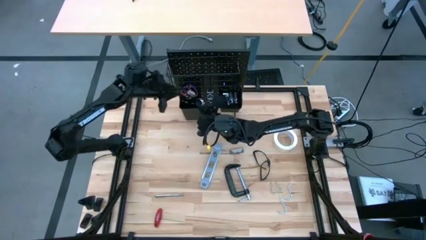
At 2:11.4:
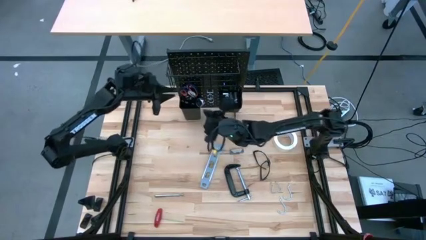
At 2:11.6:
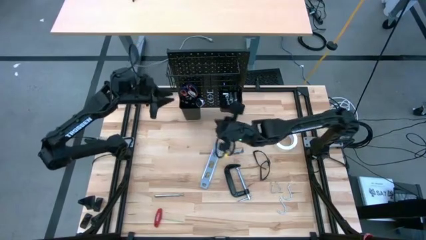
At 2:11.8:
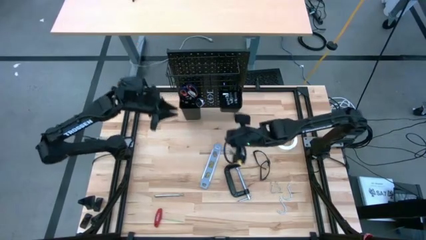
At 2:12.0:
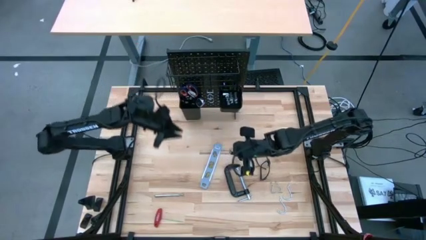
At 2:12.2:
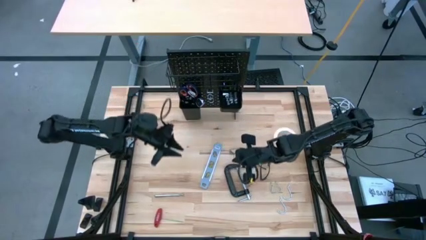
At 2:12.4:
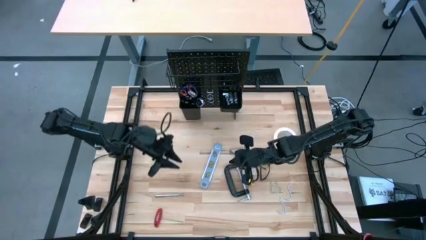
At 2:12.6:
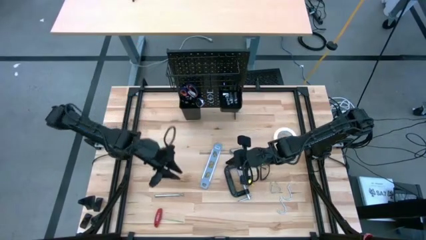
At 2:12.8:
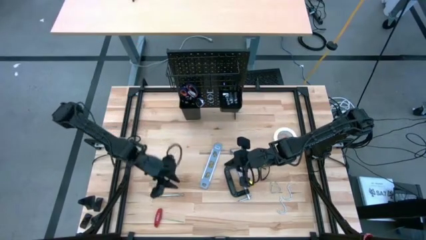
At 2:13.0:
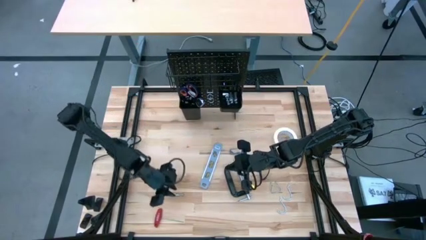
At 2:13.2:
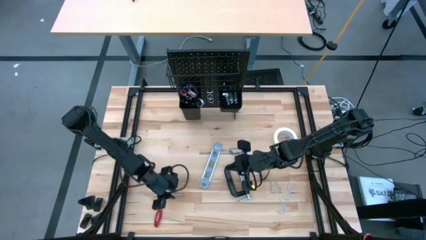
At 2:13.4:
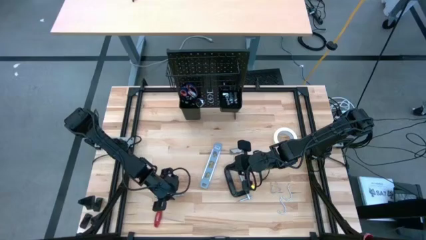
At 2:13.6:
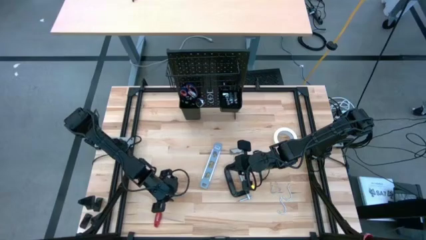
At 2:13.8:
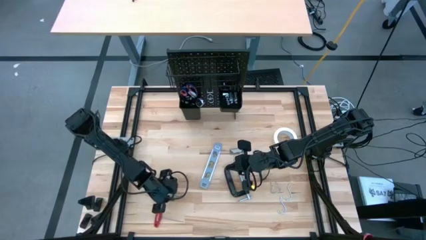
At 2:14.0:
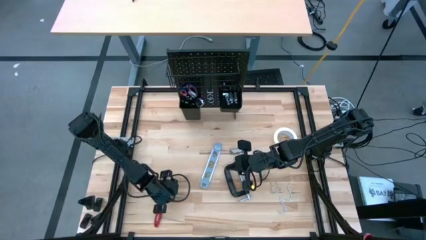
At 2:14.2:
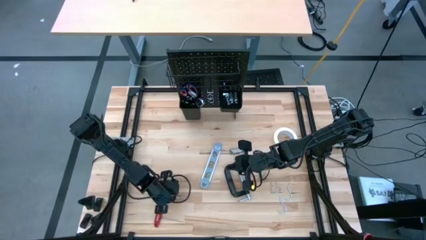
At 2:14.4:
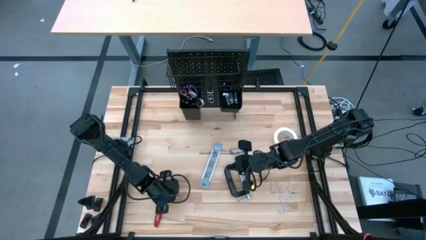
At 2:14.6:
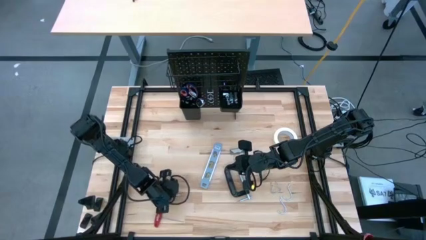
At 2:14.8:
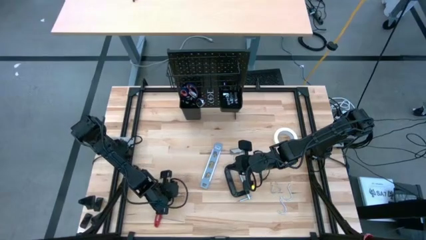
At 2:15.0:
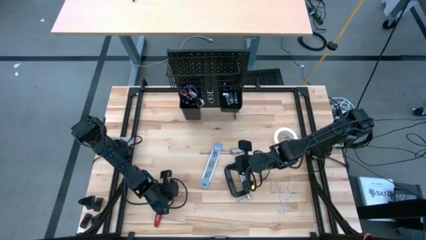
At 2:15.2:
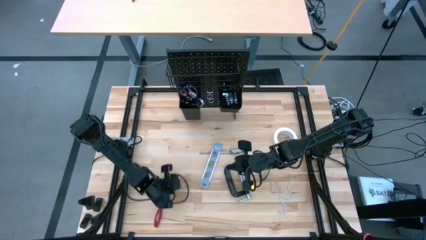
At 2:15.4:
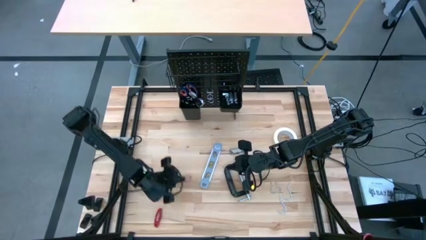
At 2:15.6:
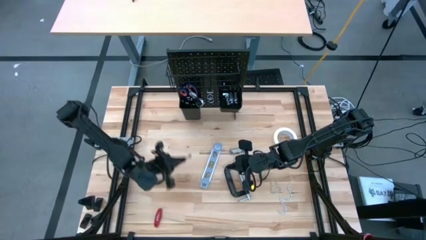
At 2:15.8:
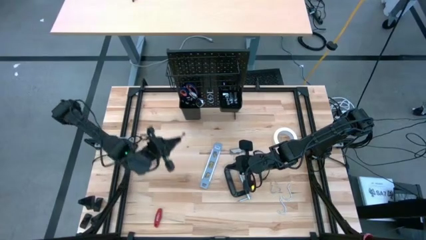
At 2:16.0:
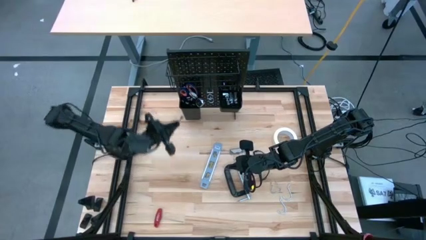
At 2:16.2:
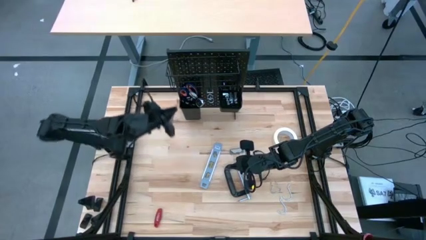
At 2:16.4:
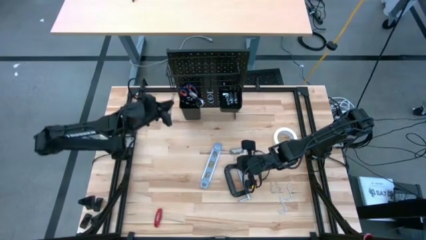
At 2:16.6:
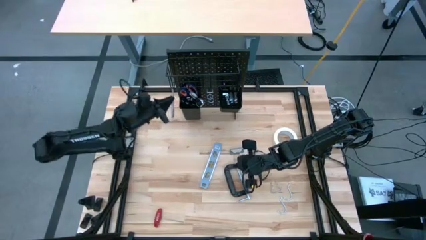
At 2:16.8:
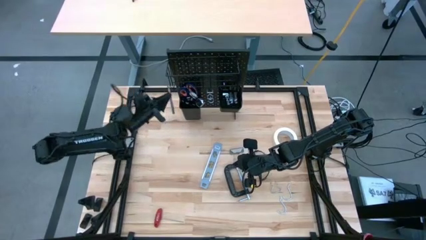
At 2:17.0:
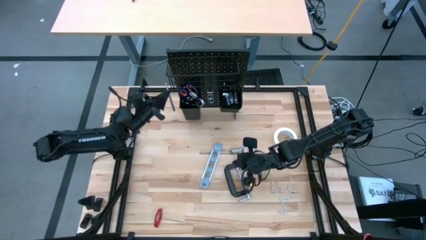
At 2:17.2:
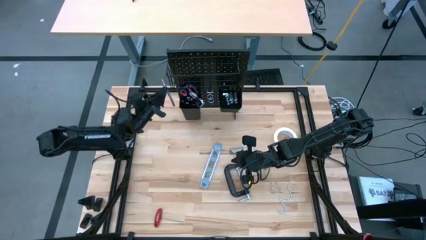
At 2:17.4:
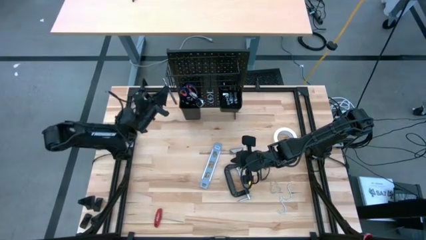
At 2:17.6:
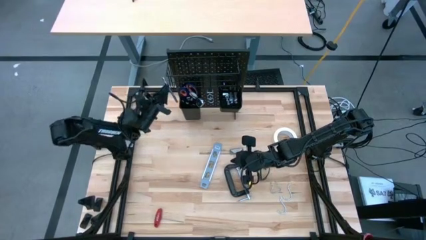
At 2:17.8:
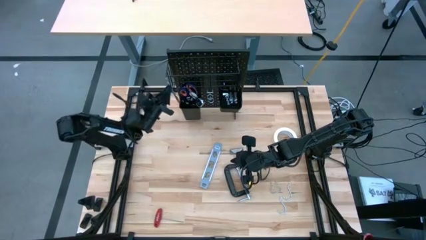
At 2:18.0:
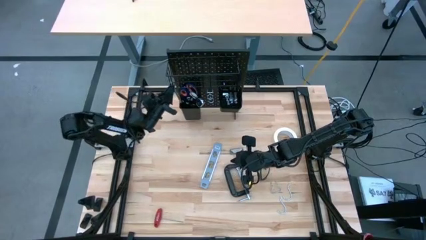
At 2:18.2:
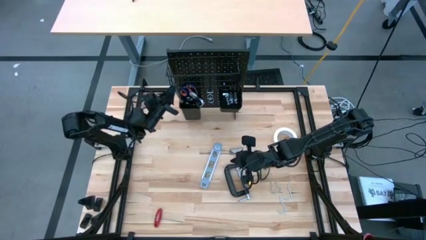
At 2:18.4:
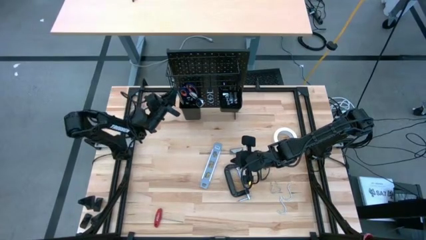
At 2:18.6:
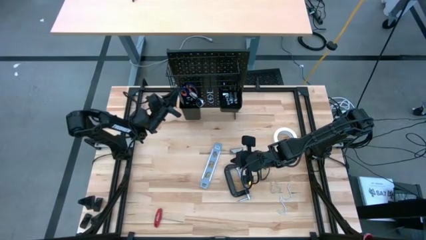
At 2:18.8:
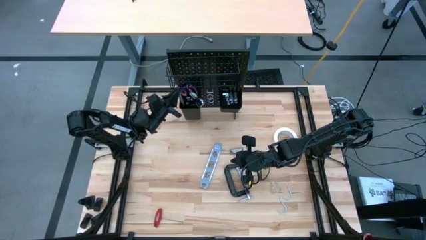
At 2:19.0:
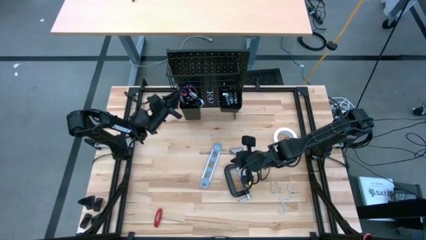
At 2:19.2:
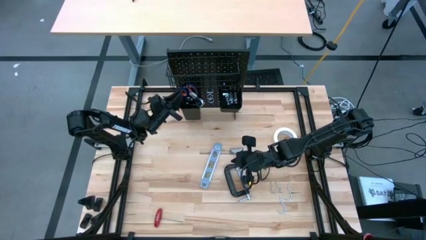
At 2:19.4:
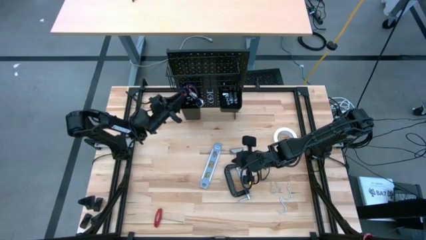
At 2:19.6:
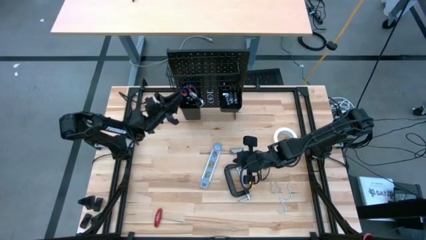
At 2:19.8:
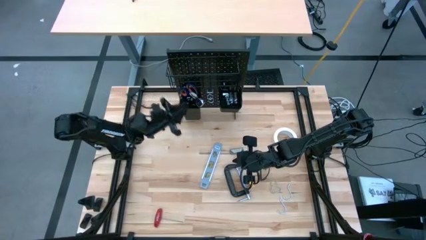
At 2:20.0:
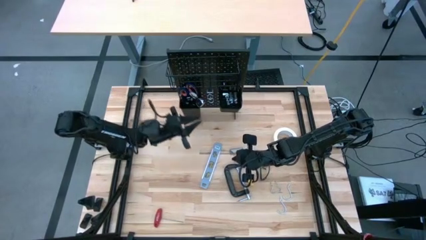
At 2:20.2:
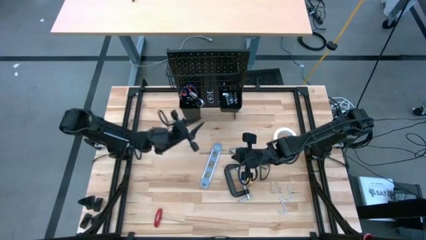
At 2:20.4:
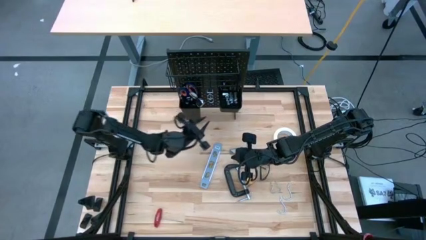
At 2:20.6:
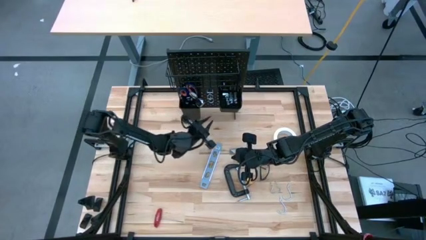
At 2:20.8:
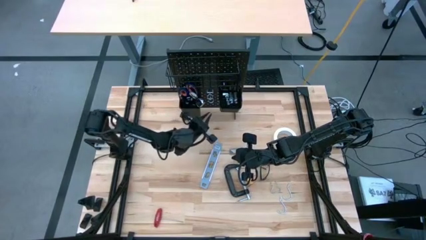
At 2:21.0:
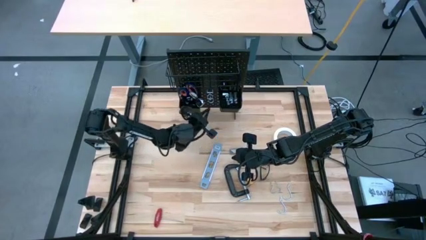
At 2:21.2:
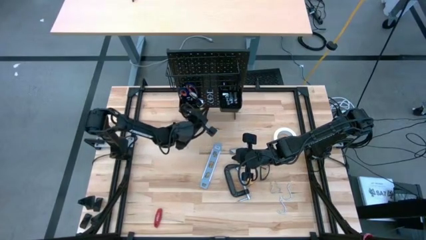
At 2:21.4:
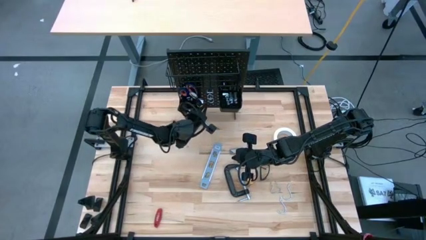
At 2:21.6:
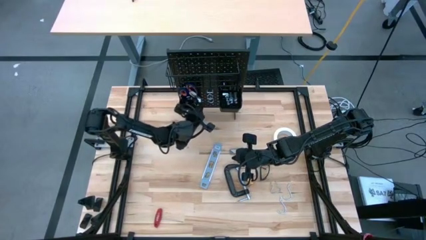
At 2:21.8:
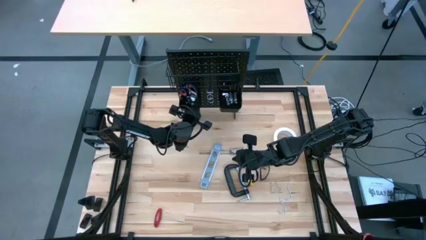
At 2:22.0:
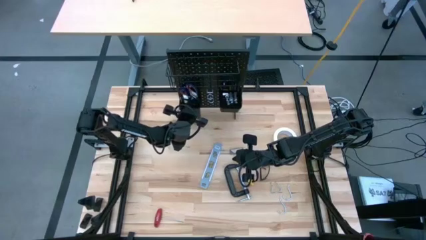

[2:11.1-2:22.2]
Task: Hang tools onto peg board
Put the magnetic puller pen tool into the left black bin on the peg board
